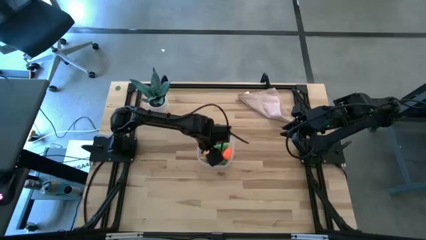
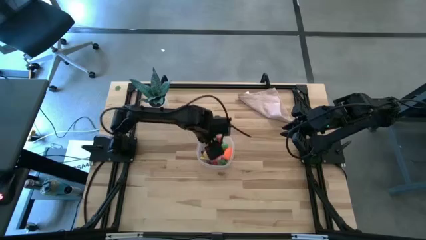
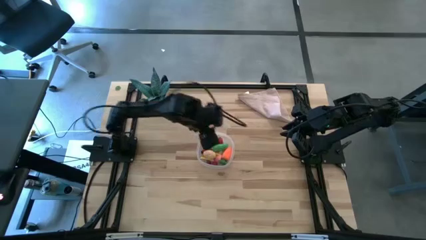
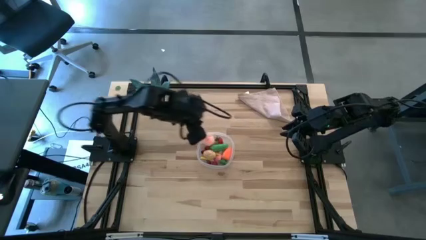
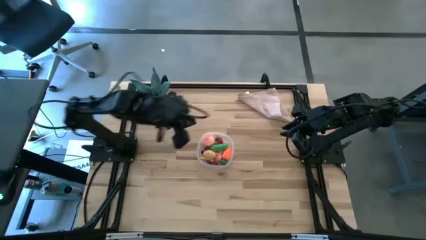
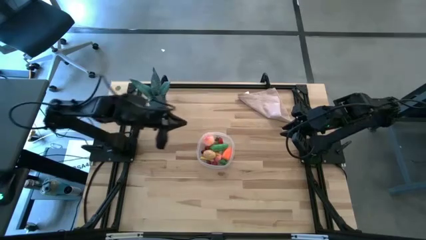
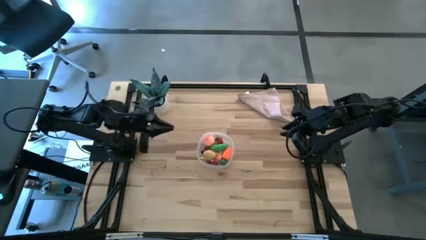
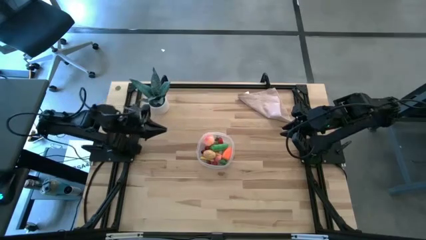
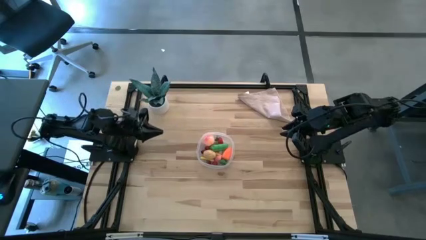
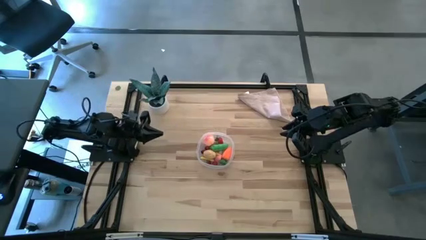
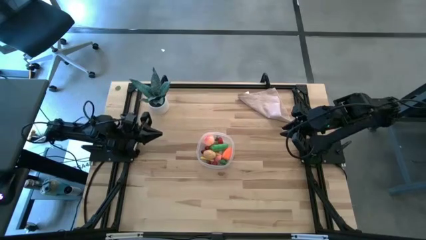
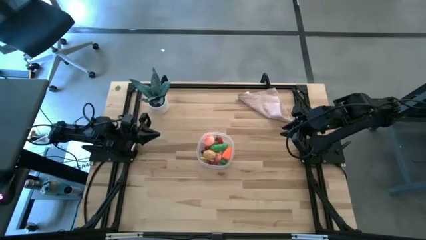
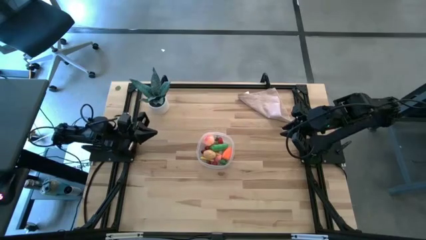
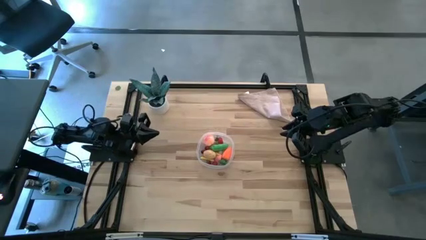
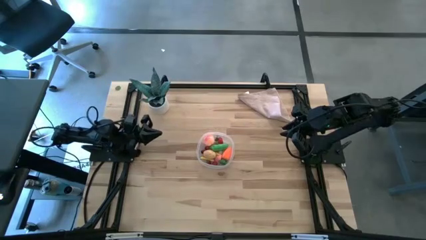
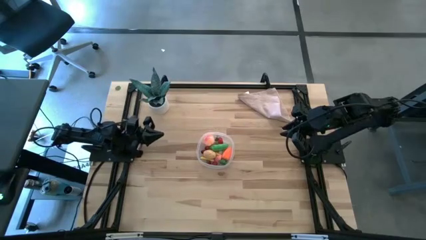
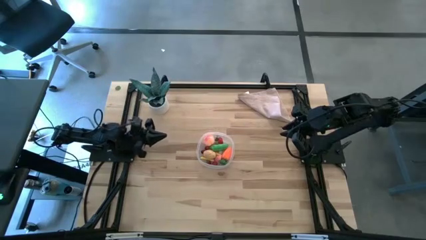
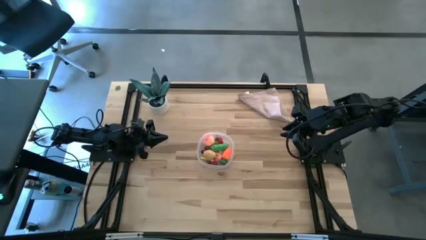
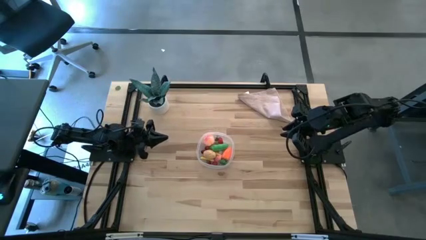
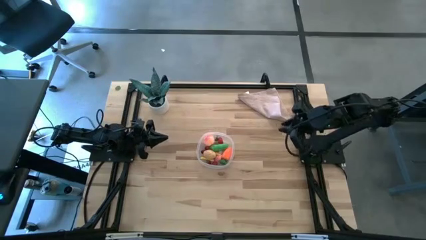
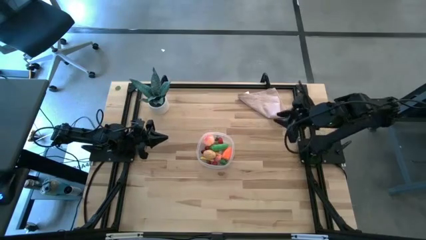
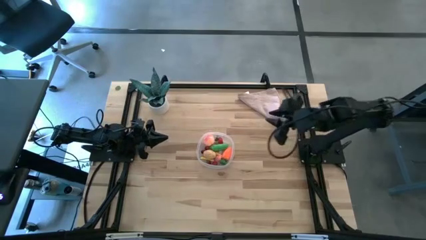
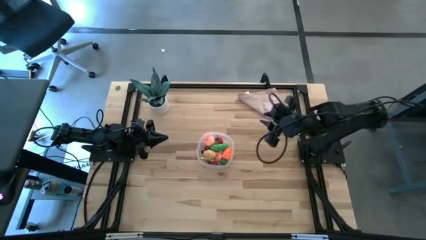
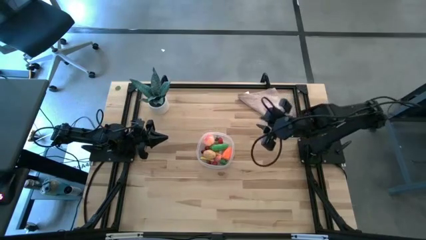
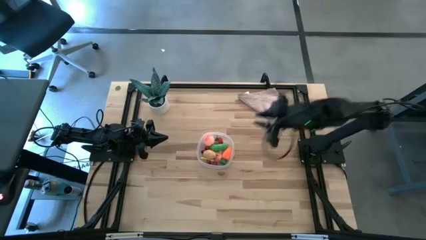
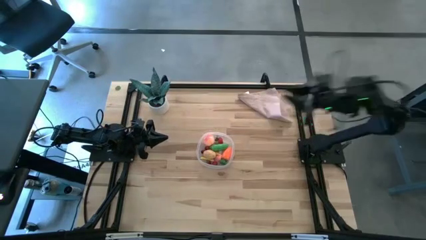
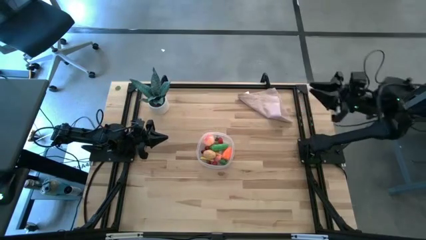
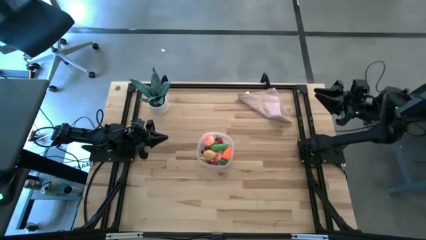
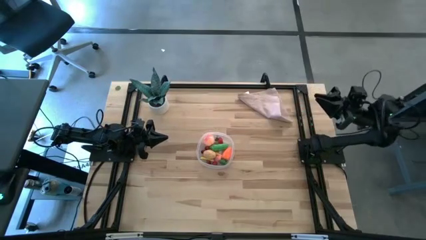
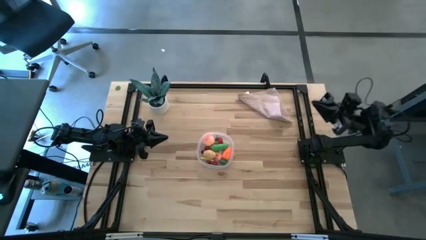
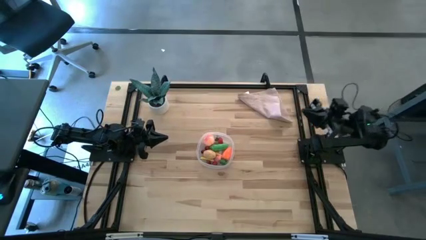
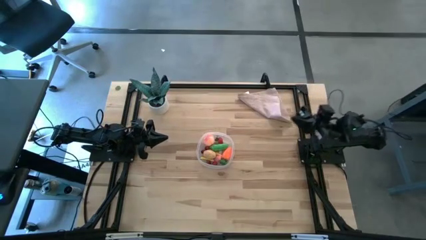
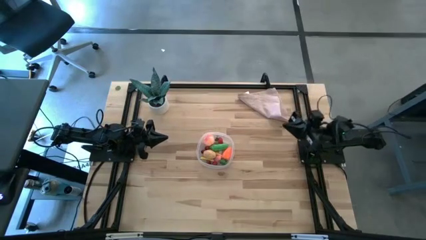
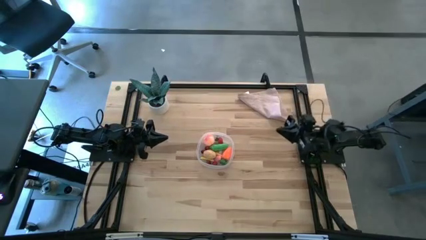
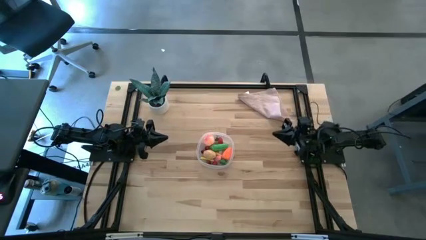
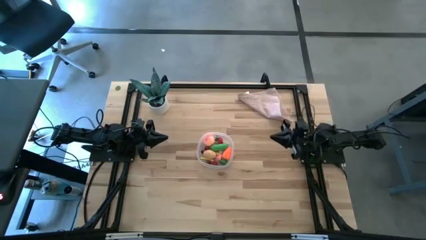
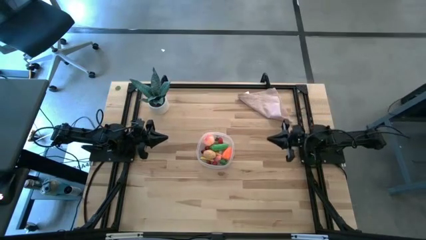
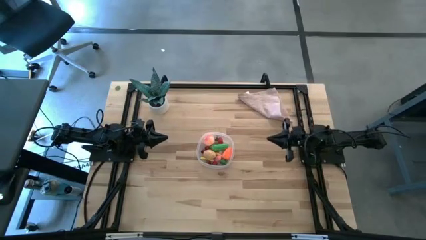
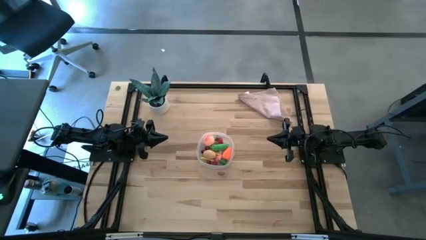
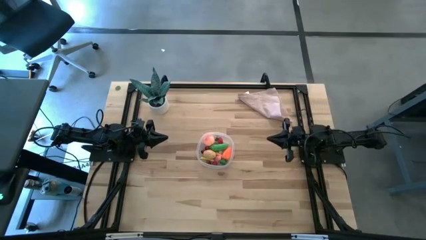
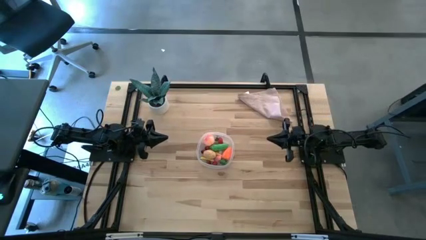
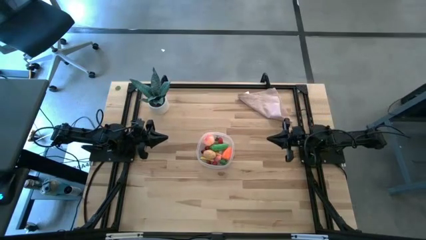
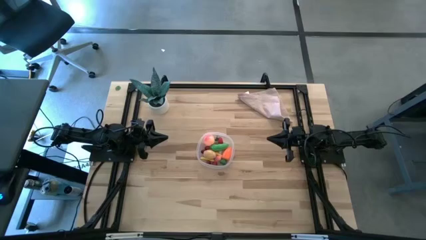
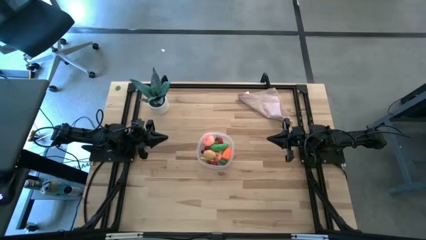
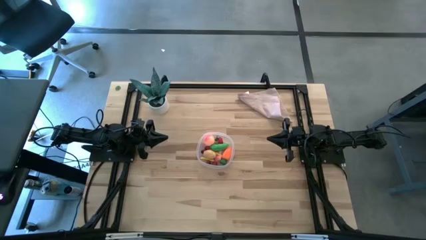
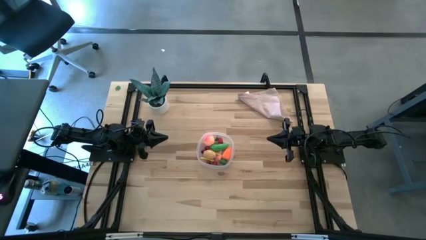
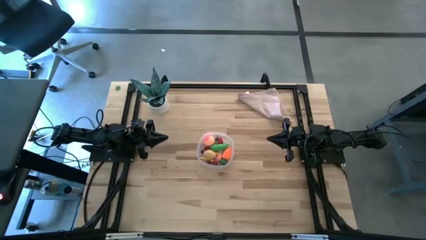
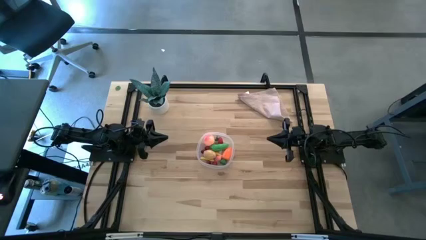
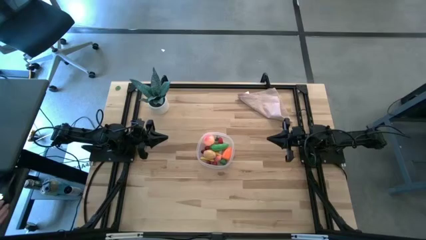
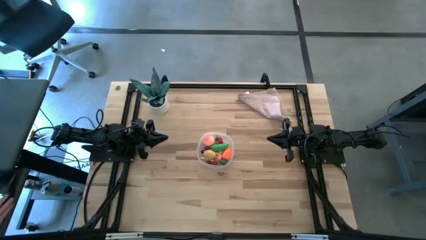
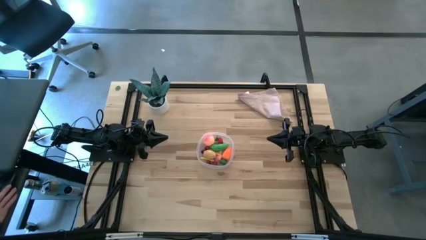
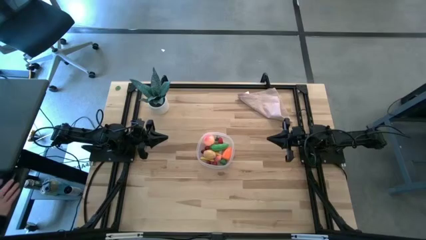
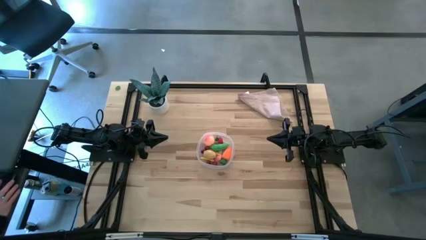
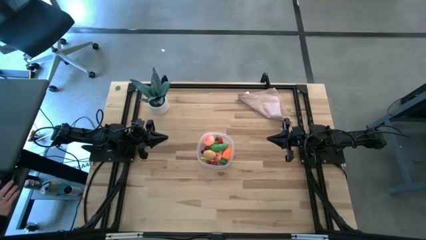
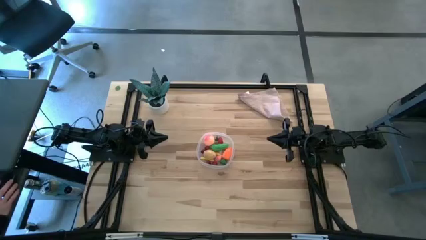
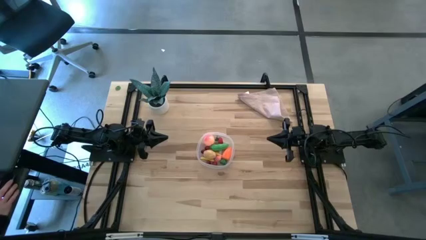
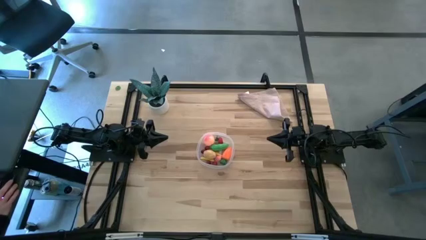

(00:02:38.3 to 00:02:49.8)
Task: Pick and placing Produce into tupperware
Return to Home Position

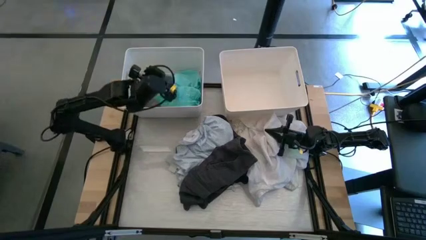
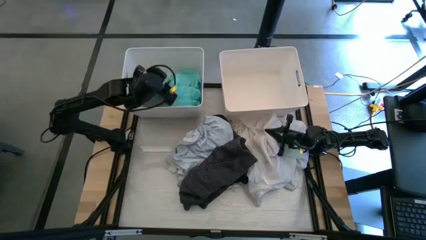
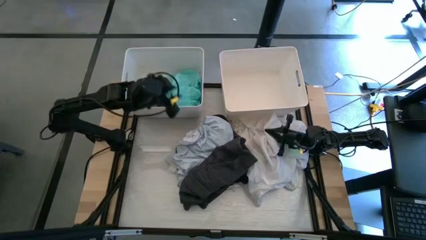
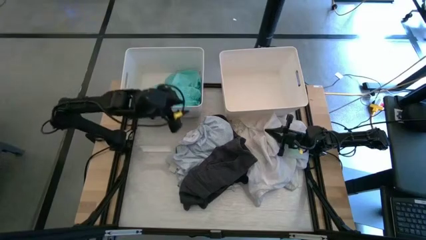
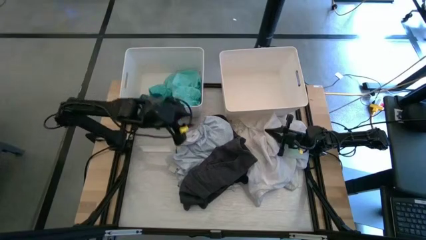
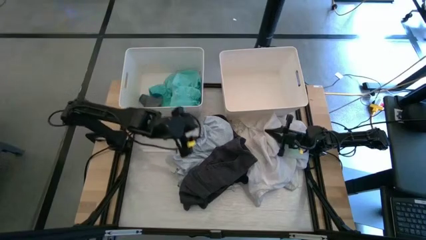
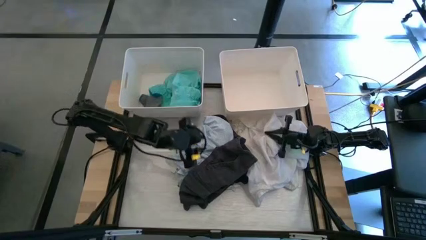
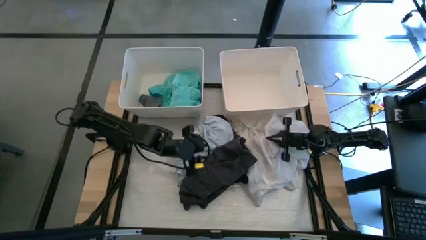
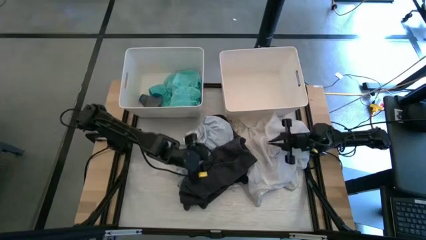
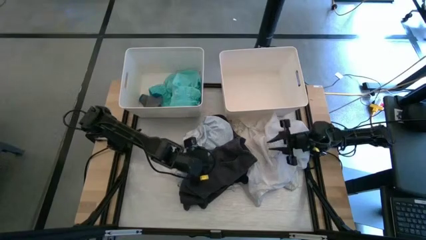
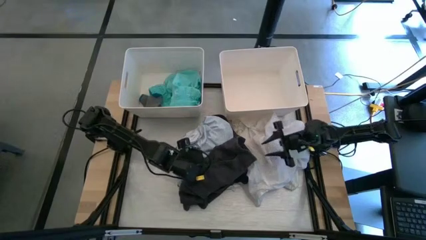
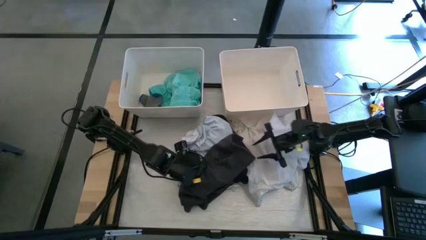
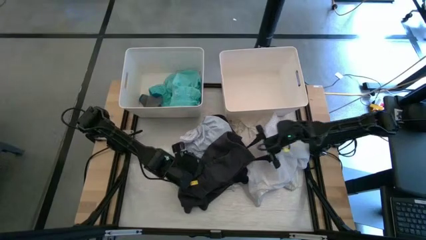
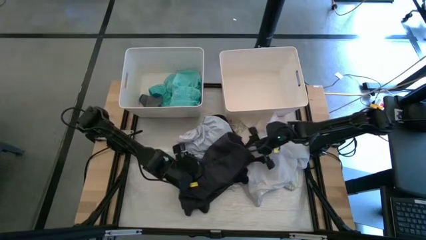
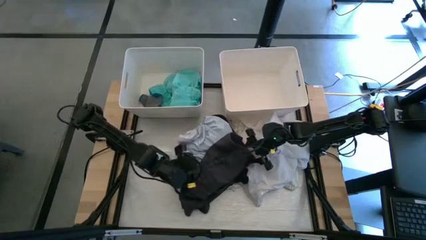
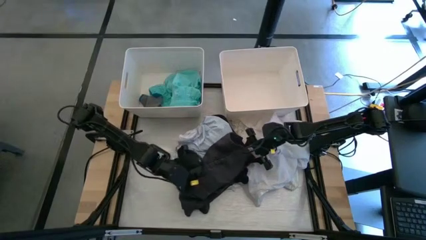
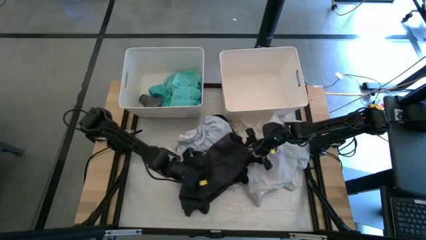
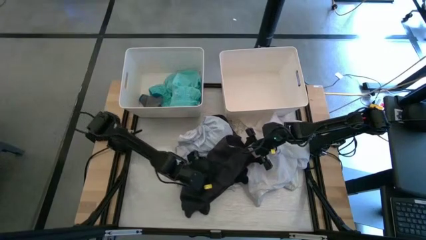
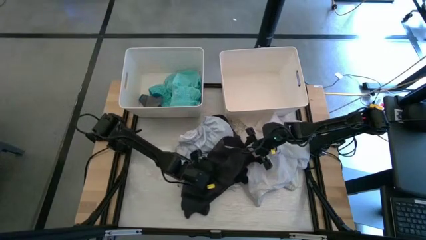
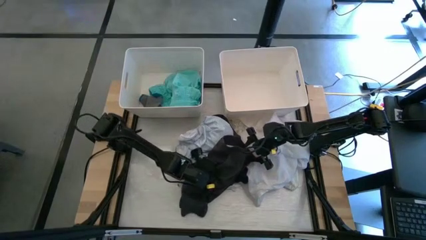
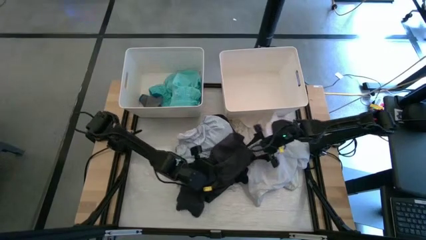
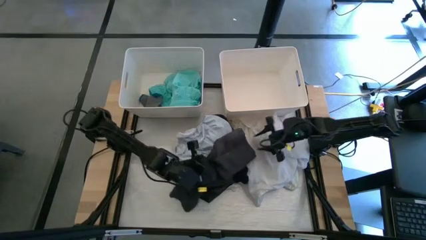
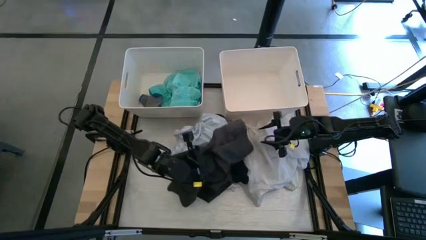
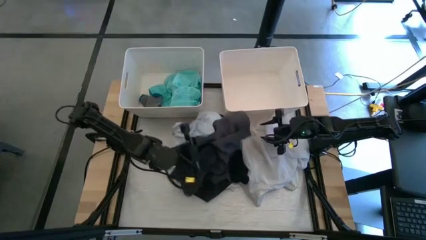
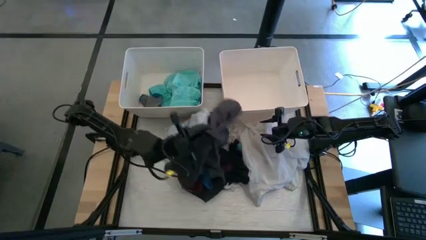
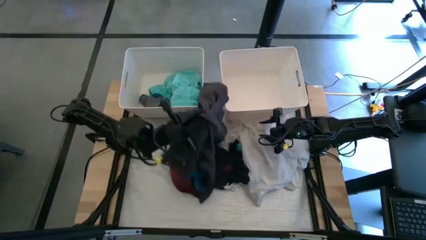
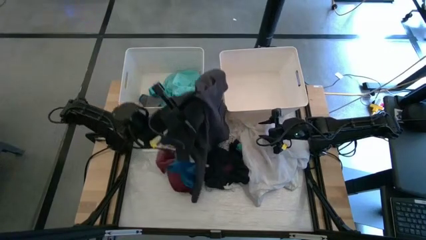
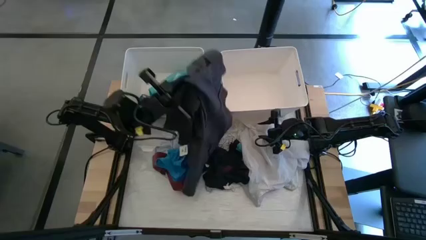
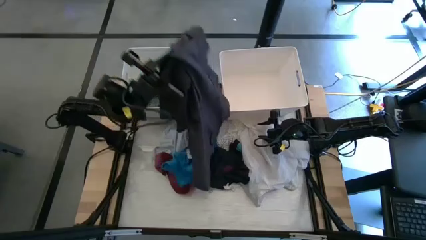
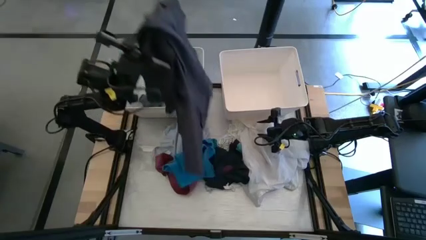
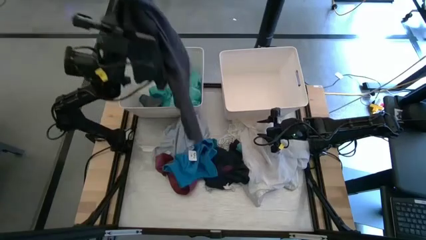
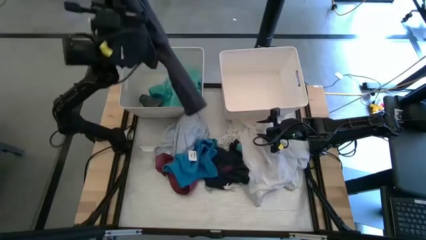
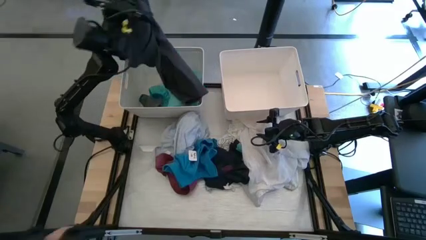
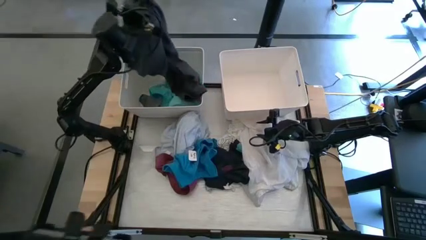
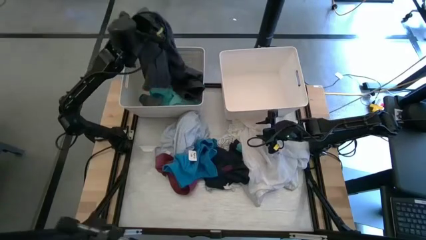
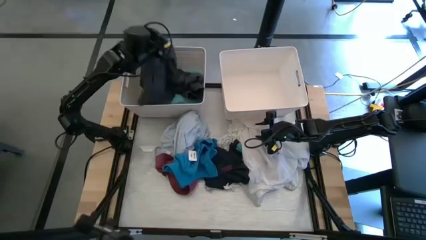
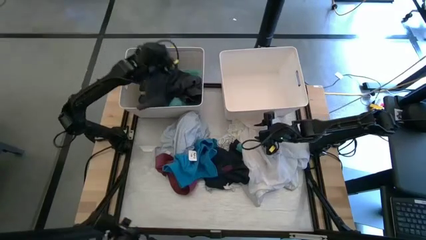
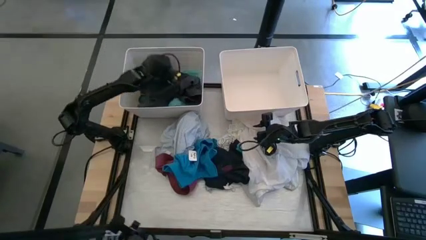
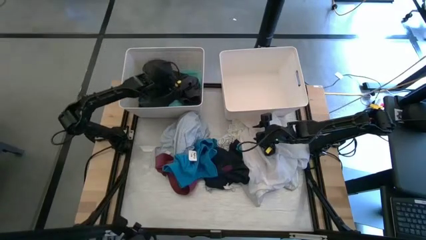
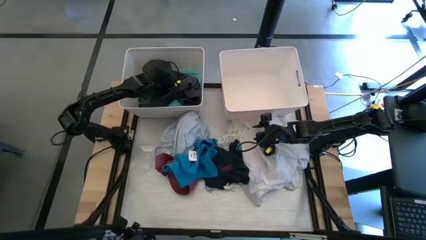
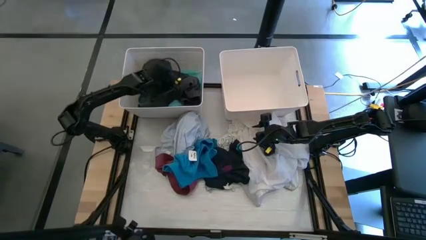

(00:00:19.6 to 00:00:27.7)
Task: Sort clothes
Put the black shorts into the left white laundry bin
